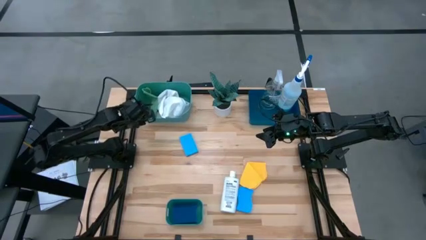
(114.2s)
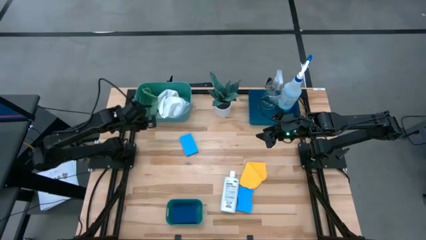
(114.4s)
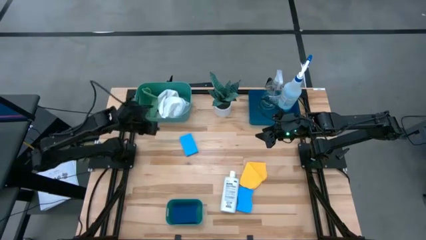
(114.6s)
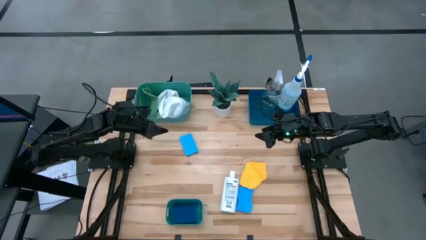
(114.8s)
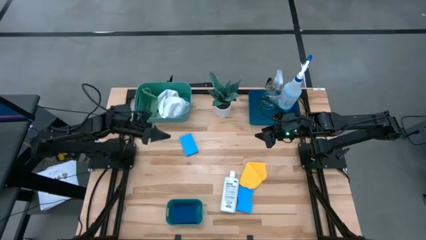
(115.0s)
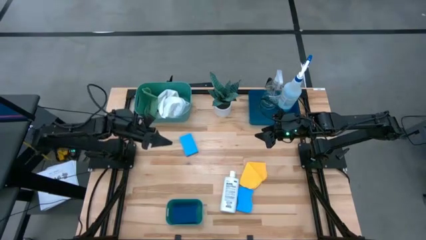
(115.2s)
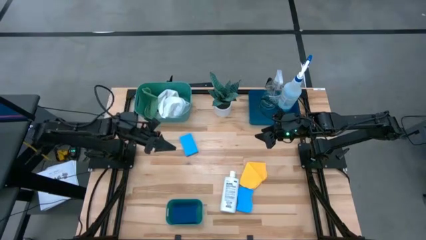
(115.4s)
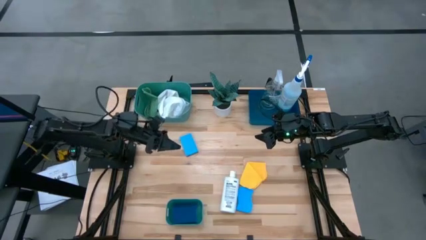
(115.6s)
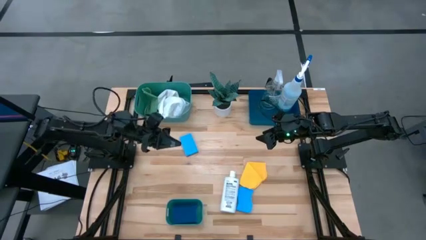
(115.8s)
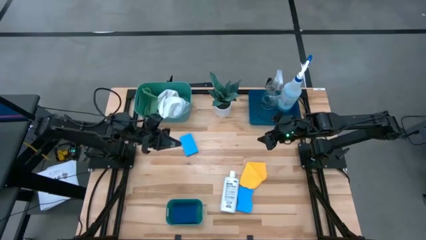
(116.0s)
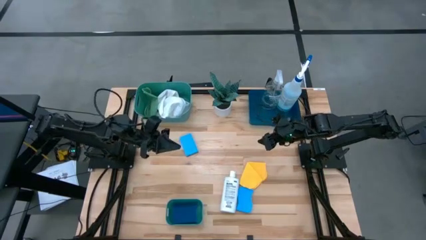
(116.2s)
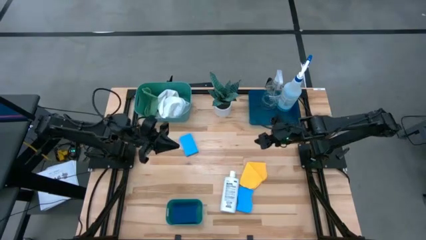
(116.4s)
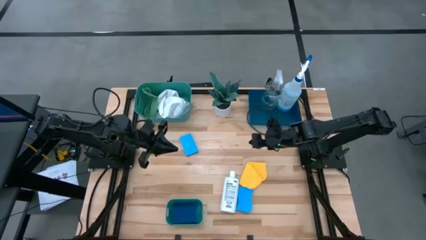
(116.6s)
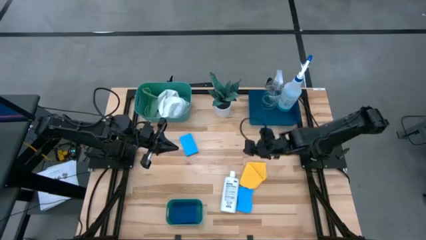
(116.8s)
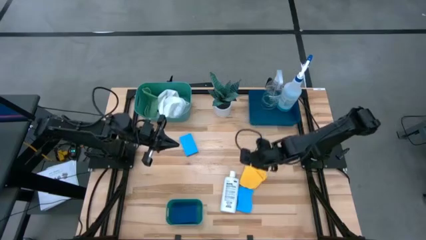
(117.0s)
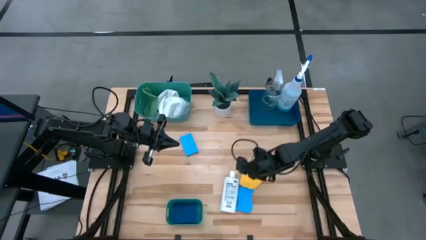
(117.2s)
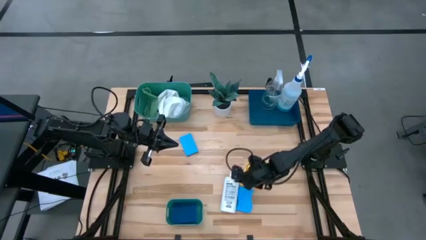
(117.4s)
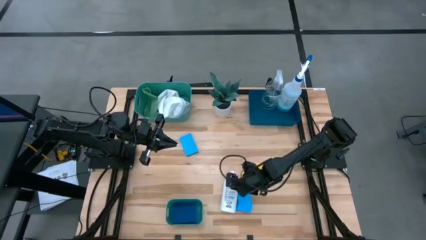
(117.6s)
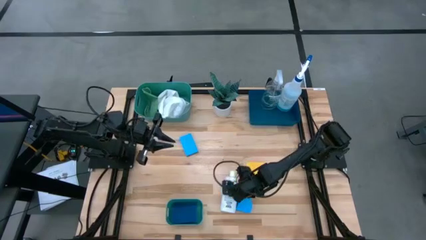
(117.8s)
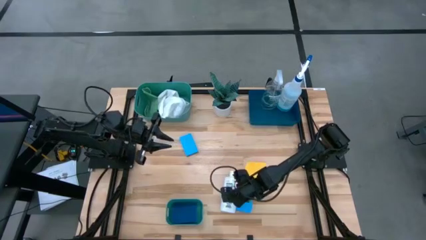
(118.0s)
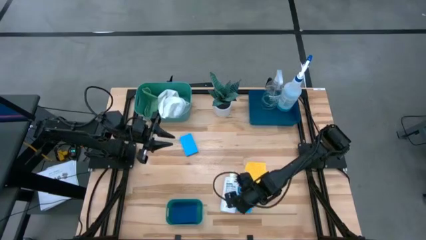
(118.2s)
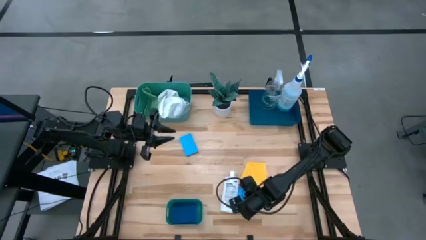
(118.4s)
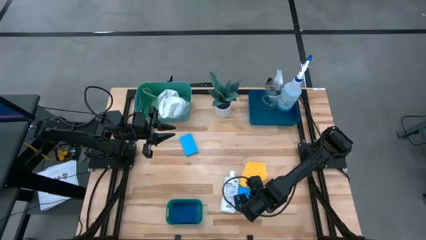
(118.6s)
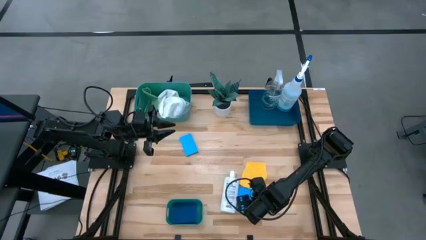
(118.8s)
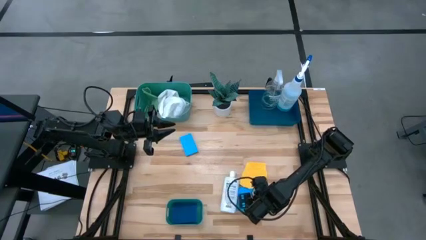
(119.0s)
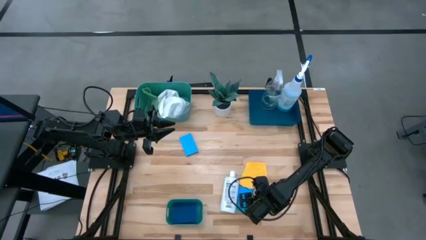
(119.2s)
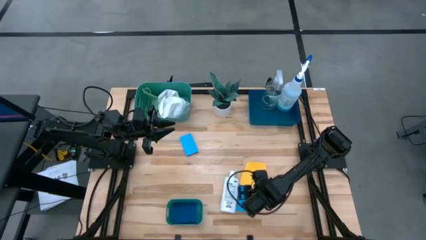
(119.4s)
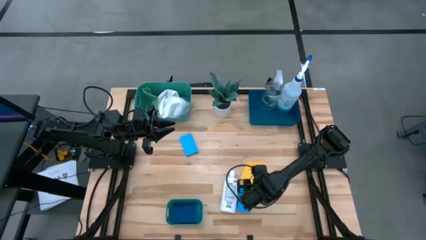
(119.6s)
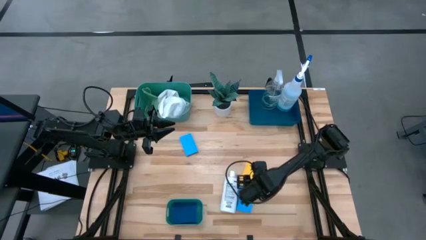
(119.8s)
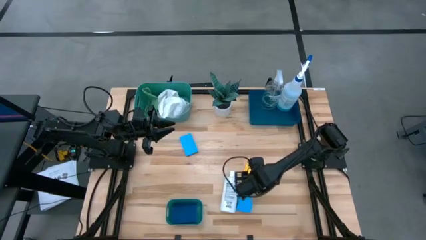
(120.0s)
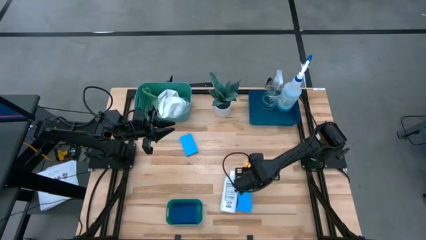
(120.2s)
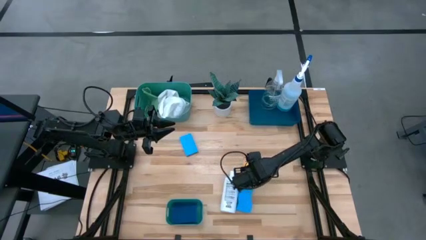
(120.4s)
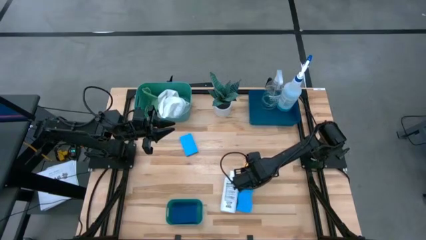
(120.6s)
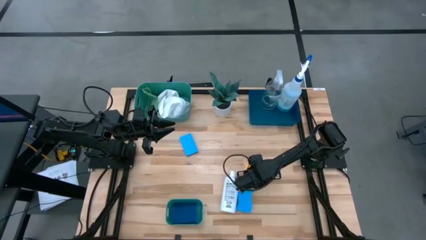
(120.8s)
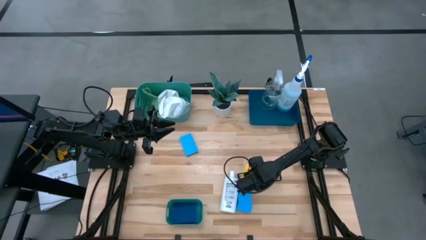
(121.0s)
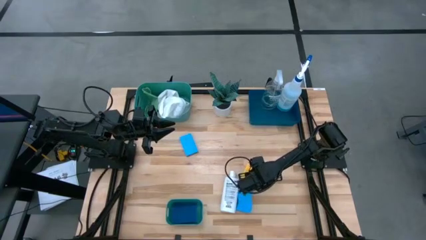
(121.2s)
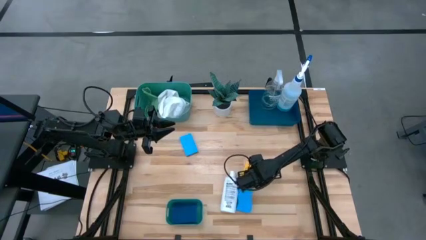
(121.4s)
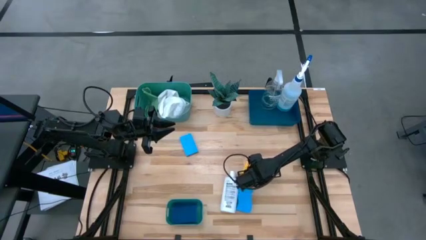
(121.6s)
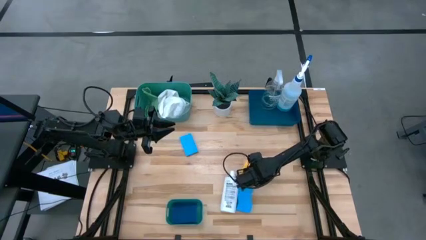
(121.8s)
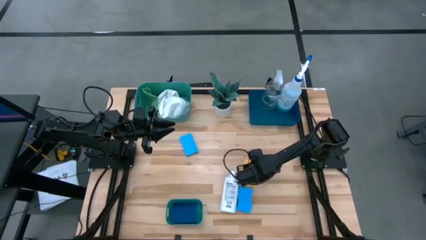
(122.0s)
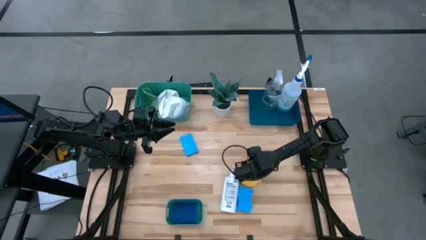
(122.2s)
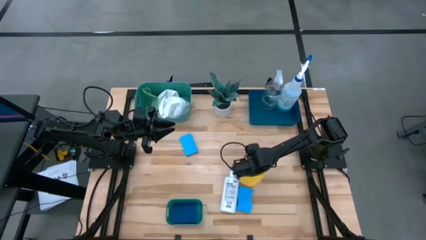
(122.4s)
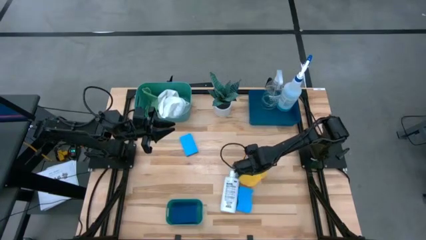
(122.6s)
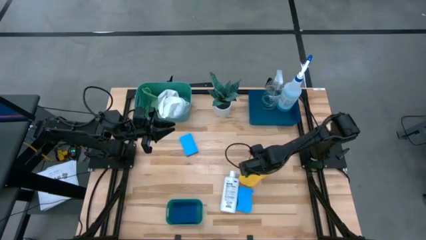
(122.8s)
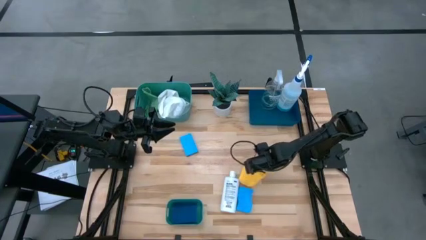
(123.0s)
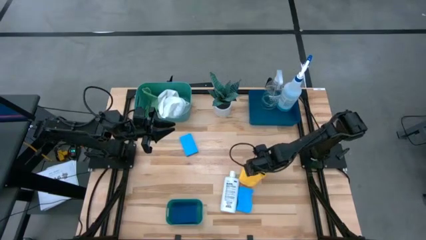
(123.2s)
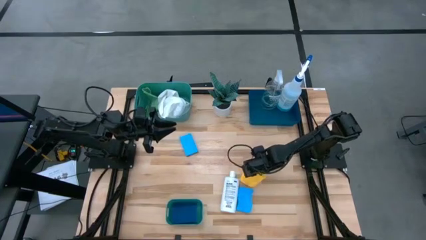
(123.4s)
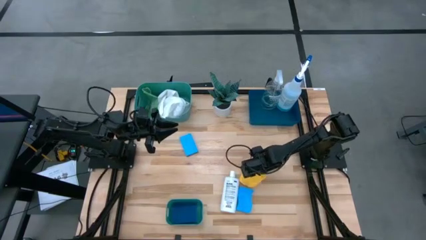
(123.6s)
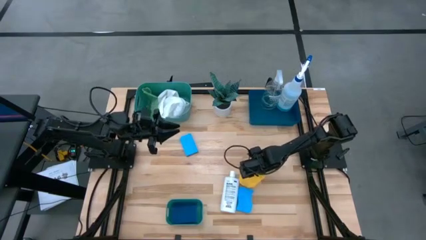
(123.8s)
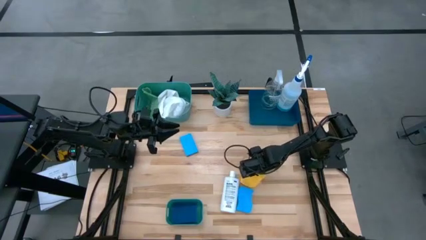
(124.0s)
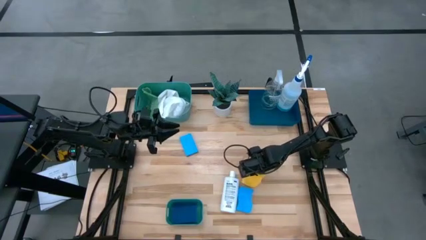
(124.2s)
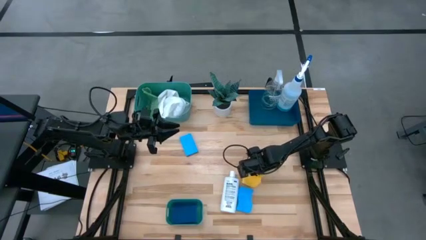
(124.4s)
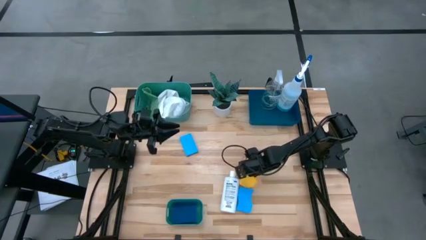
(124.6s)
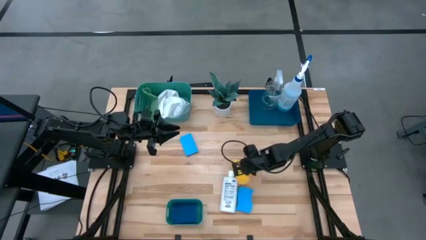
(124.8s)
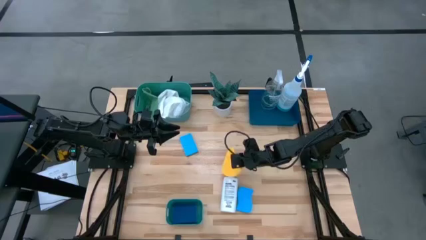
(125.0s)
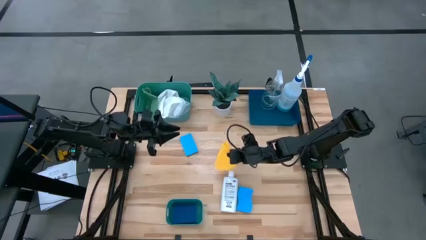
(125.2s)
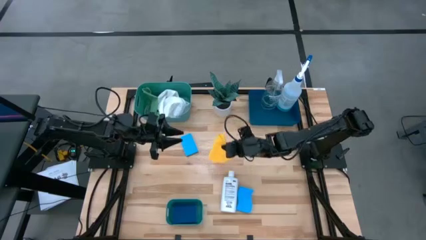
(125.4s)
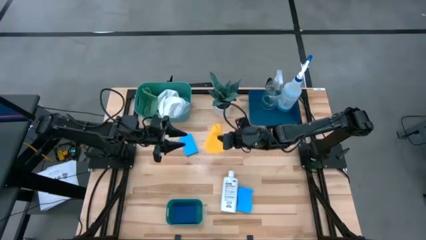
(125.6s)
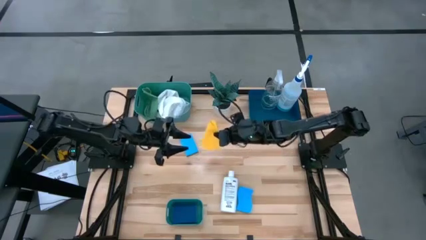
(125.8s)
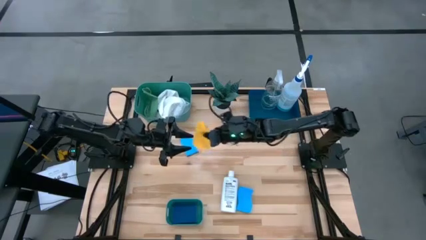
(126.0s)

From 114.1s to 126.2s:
Task: Pick & Place Kitchen Items
Put the yellow microfiber cloth into the top green bin

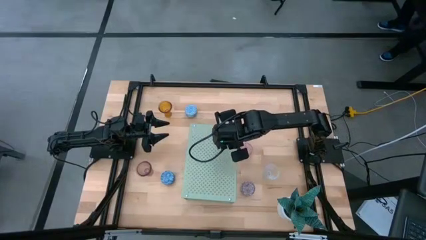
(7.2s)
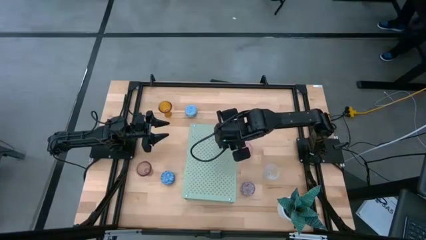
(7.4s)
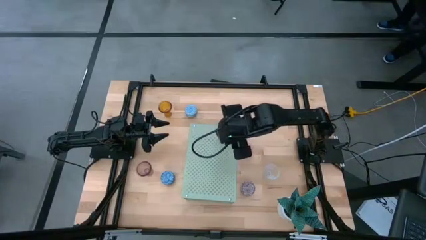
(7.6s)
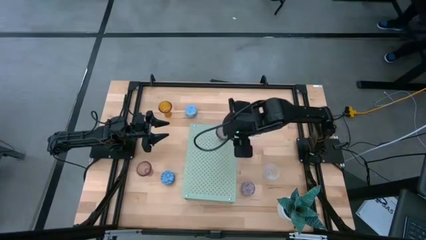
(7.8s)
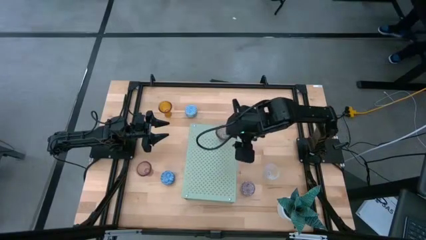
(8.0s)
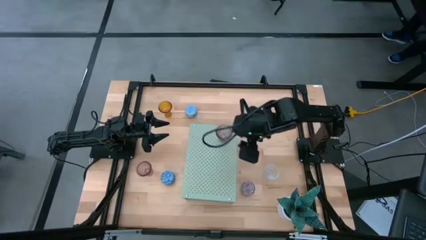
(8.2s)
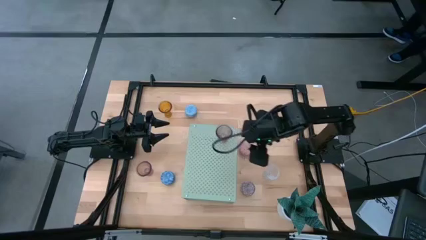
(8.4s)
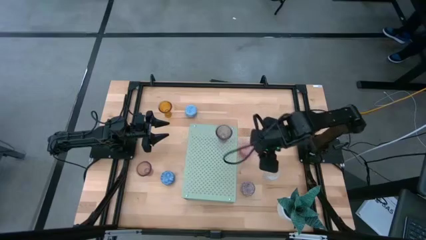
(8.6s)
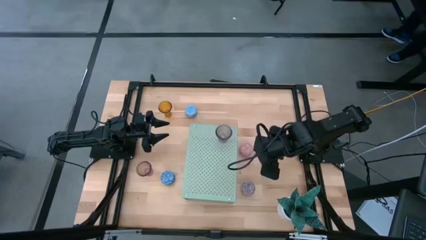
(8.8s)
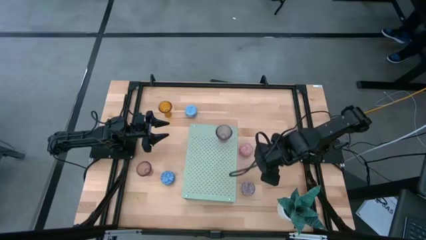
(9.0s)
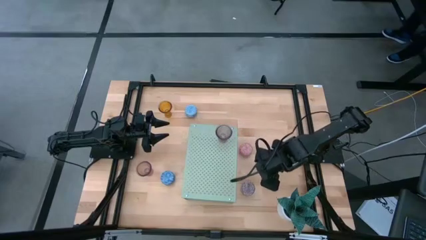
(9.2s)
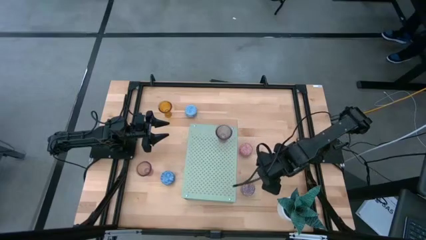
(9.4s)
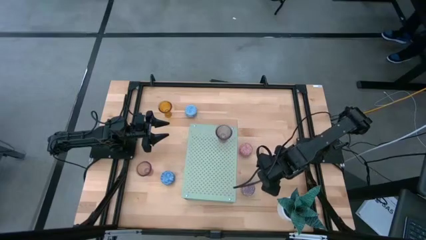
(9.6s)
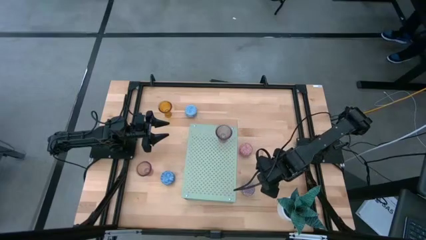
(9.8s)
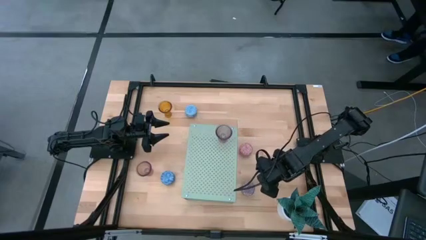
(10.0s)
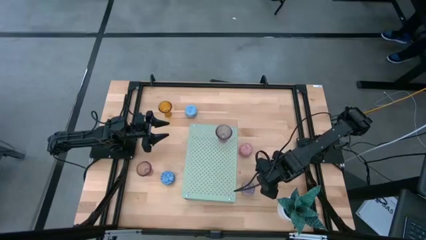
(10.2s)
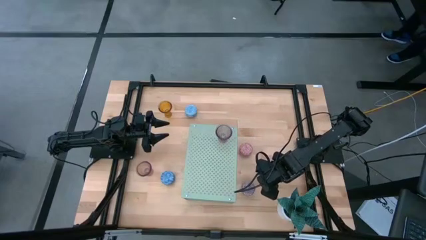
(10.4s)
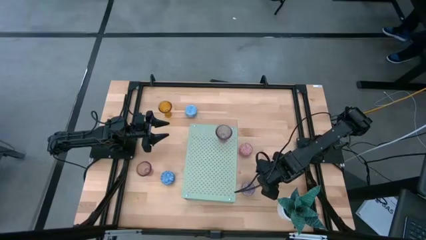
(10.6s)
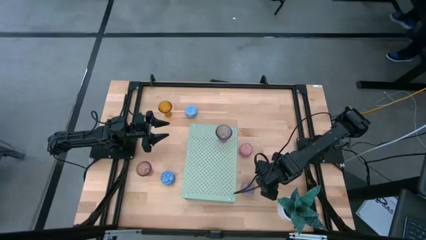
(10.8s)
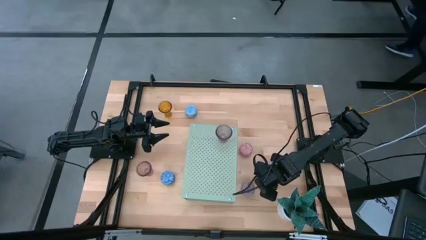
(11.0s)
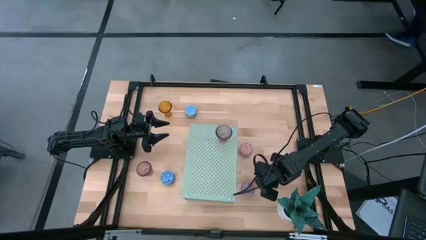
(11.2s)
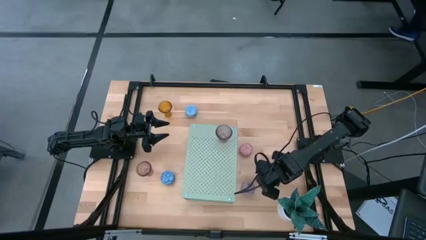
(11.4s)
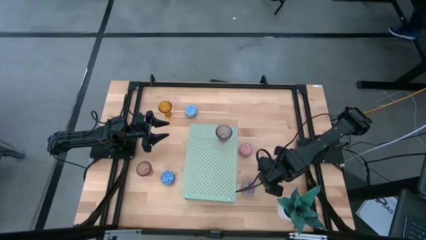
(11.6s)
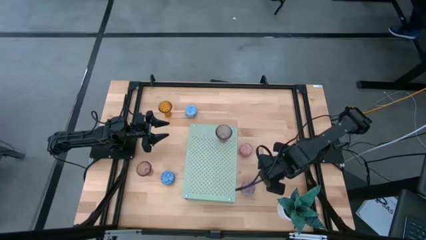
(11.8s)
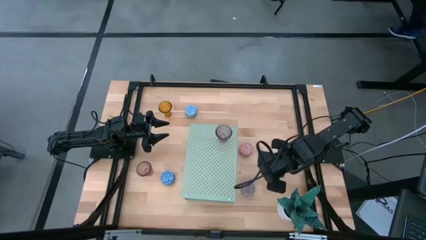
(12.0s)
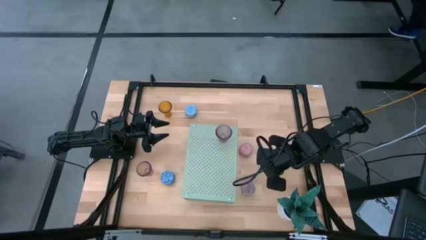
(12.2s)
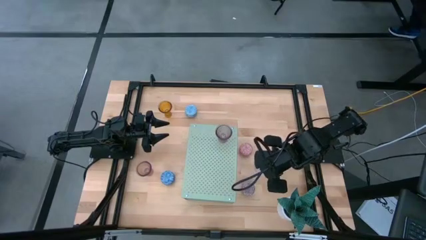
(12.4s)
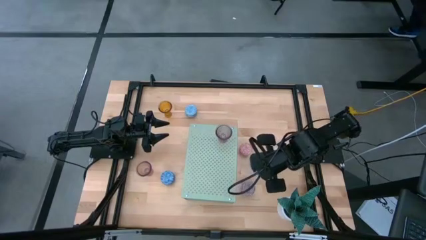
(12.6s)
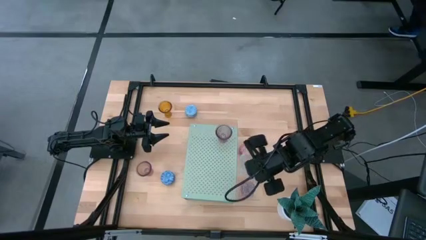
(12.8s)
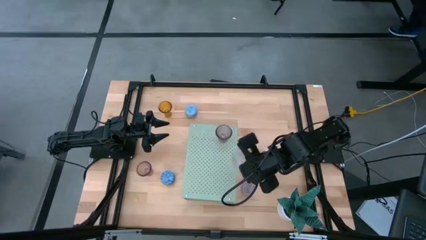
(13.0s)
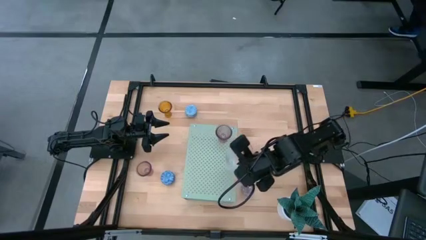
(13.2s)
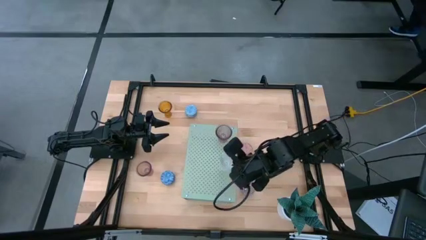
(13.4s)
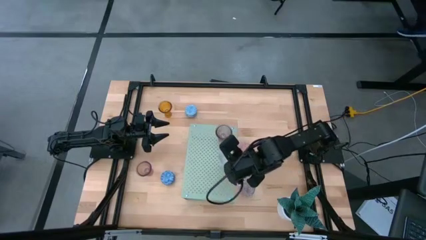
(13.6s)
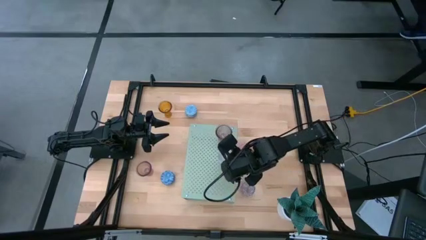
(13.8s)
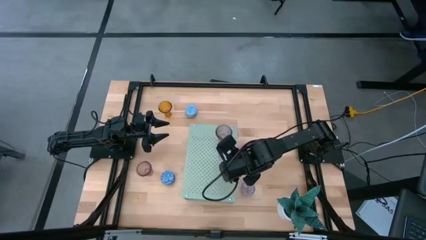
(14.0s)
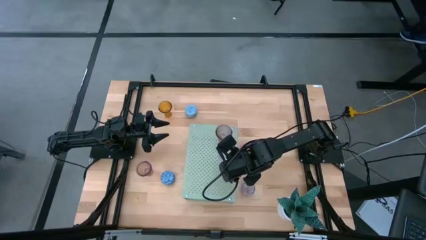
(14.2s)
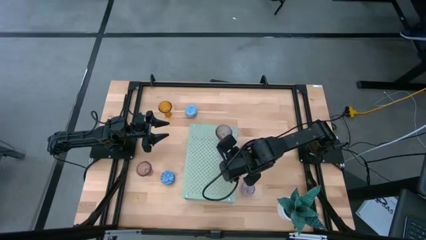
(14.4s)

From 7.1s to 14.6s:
Task: Pick & Place candle stick holders
Put the transparent candle holder on the shelf
